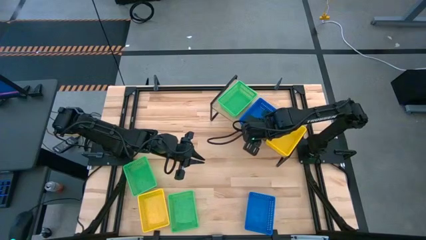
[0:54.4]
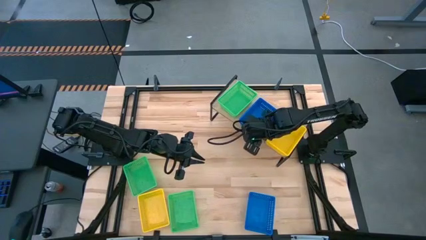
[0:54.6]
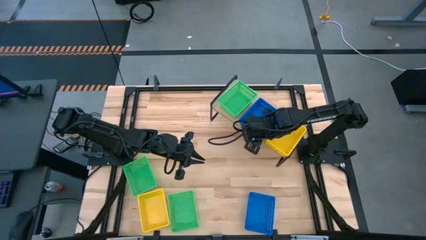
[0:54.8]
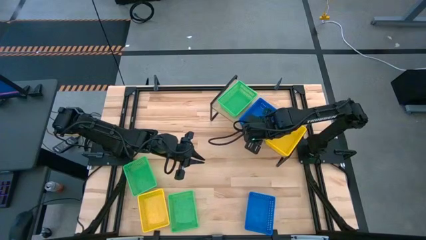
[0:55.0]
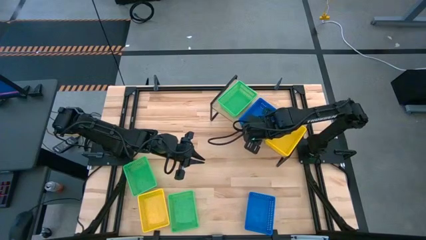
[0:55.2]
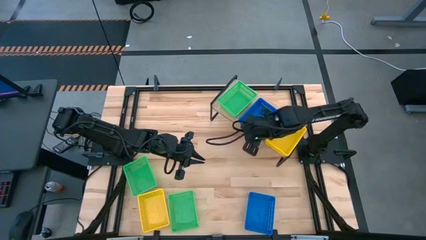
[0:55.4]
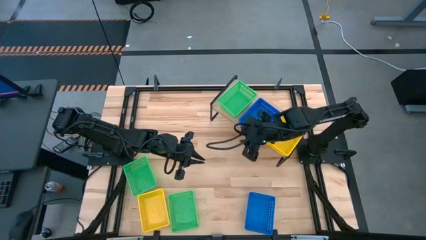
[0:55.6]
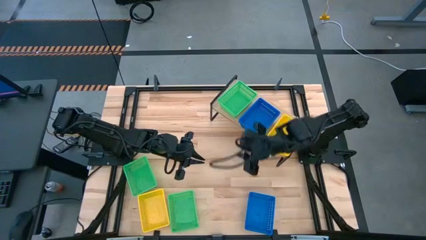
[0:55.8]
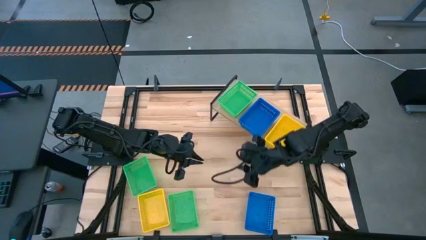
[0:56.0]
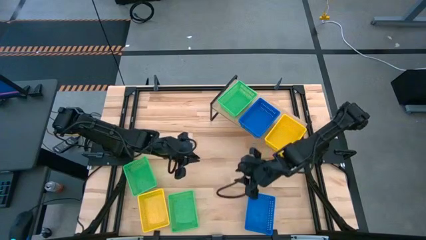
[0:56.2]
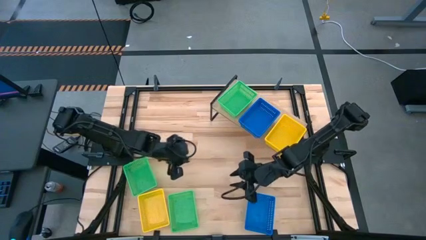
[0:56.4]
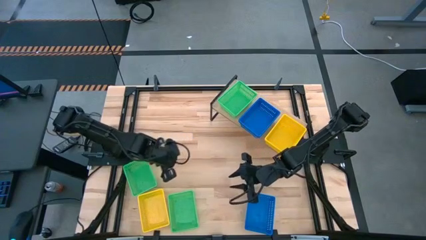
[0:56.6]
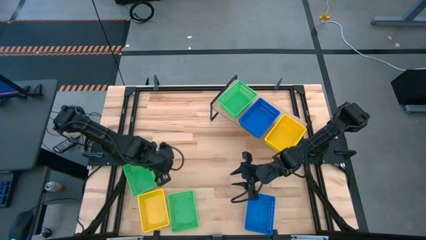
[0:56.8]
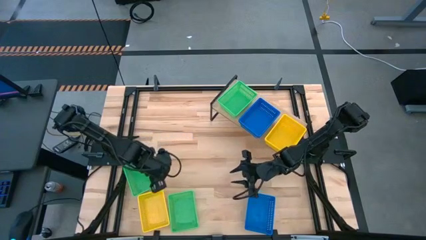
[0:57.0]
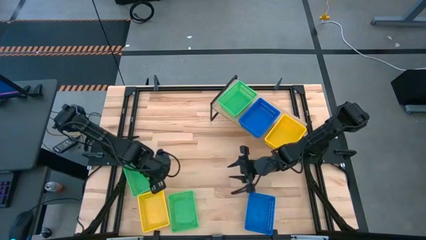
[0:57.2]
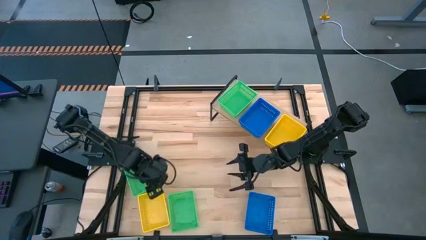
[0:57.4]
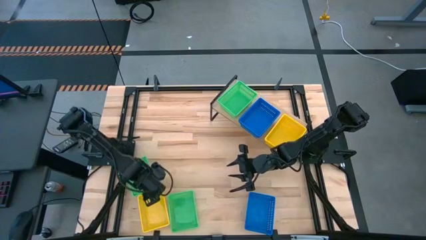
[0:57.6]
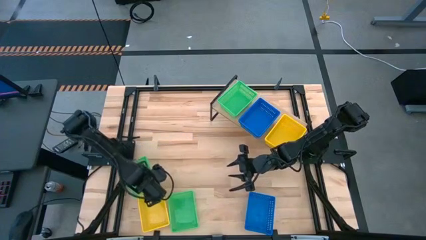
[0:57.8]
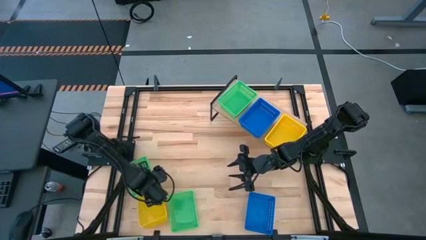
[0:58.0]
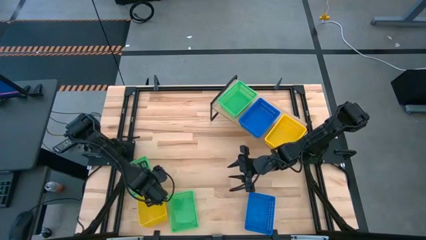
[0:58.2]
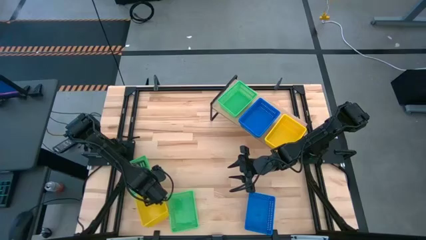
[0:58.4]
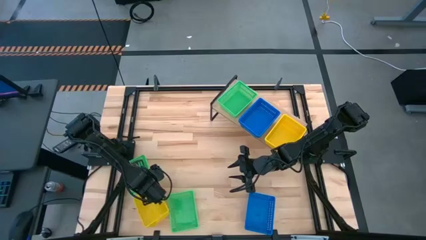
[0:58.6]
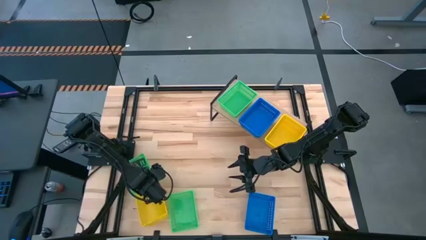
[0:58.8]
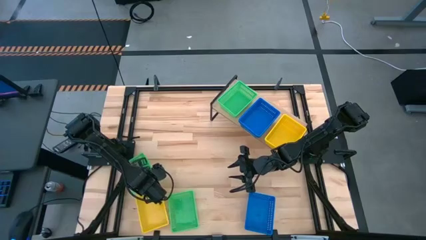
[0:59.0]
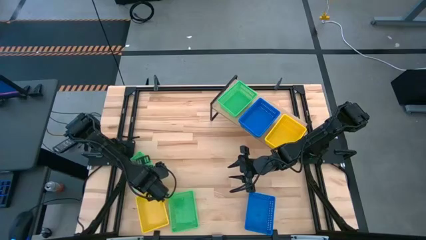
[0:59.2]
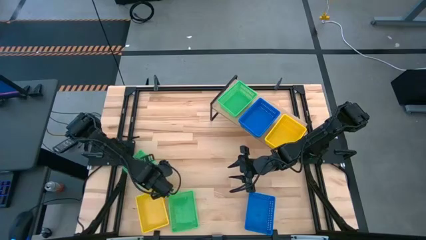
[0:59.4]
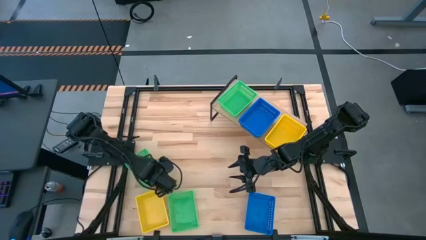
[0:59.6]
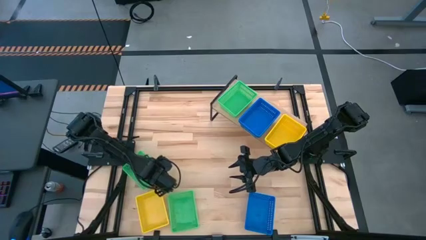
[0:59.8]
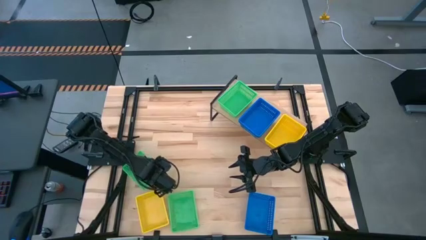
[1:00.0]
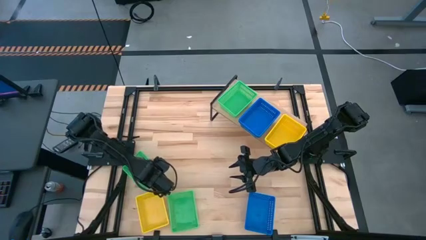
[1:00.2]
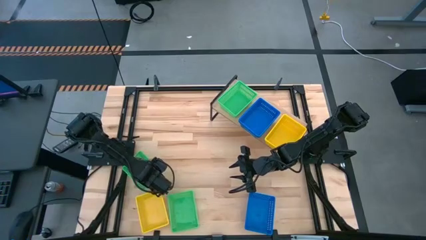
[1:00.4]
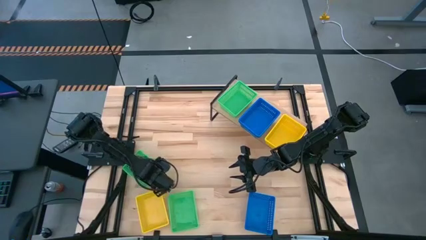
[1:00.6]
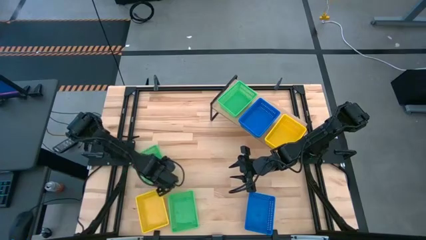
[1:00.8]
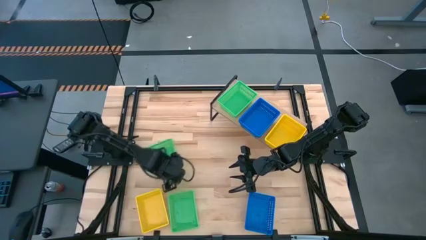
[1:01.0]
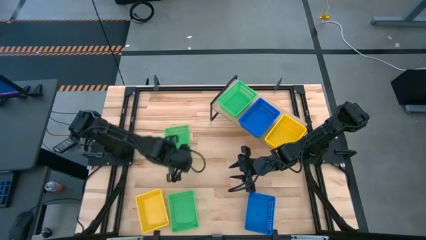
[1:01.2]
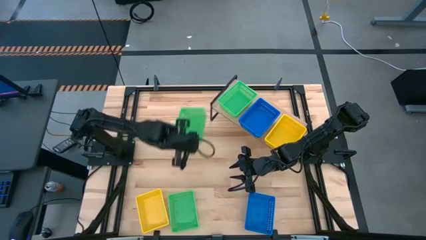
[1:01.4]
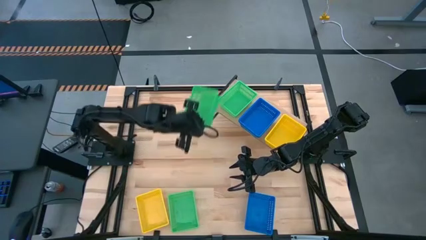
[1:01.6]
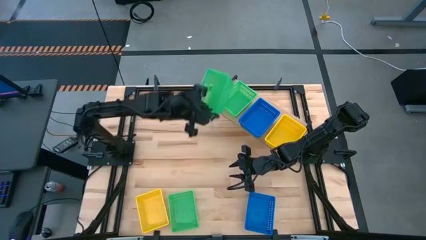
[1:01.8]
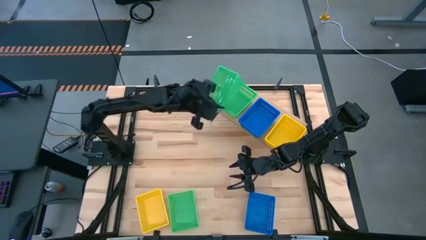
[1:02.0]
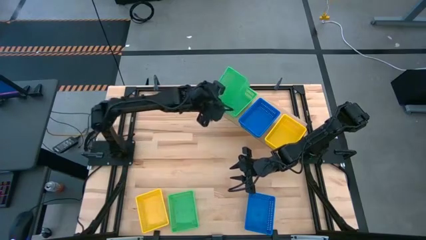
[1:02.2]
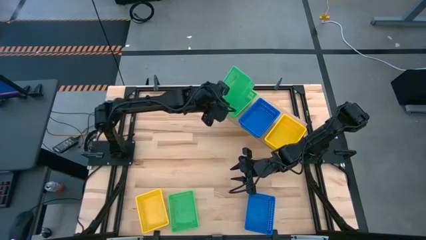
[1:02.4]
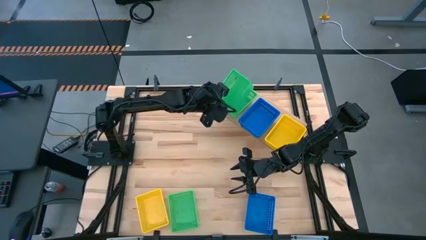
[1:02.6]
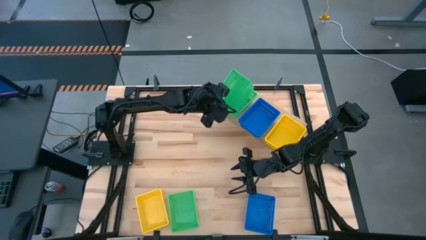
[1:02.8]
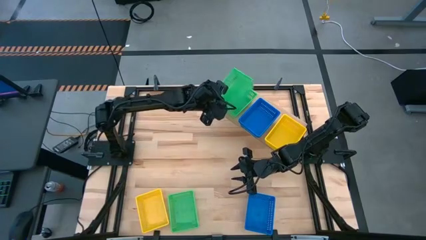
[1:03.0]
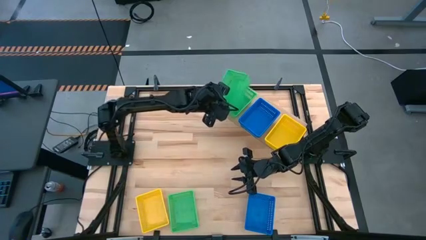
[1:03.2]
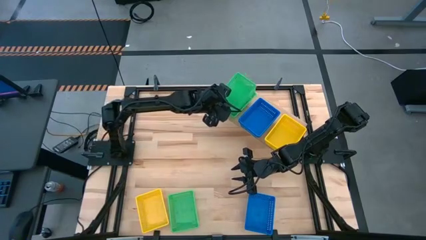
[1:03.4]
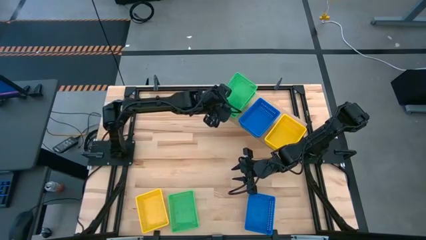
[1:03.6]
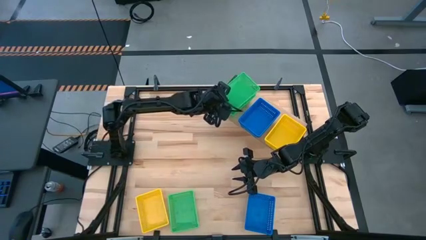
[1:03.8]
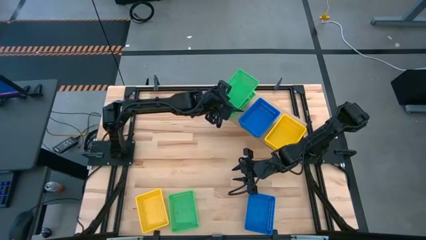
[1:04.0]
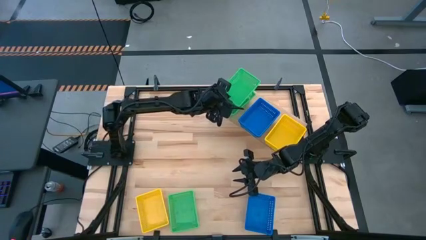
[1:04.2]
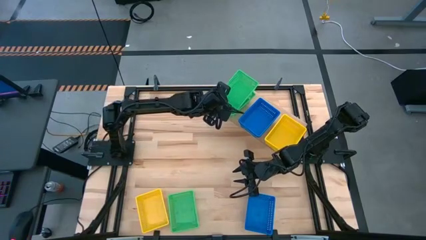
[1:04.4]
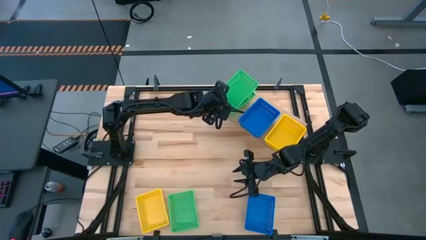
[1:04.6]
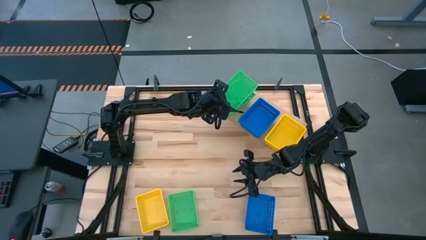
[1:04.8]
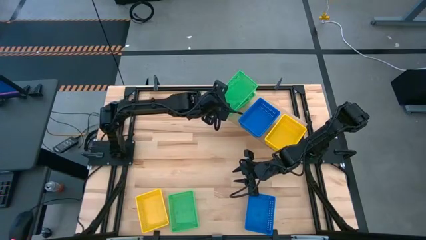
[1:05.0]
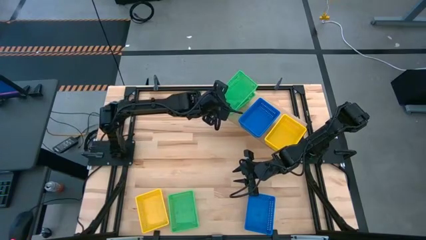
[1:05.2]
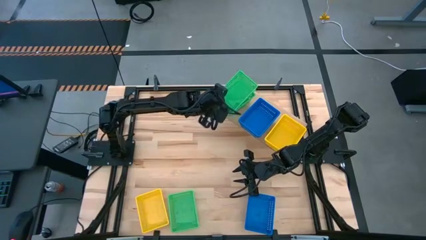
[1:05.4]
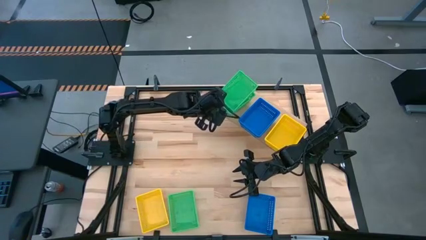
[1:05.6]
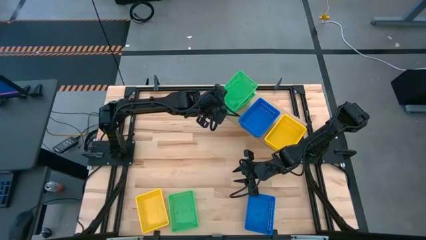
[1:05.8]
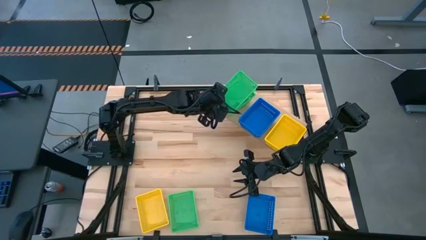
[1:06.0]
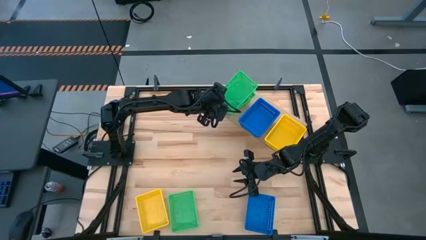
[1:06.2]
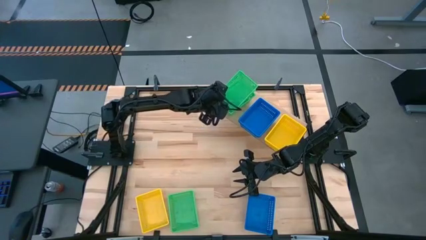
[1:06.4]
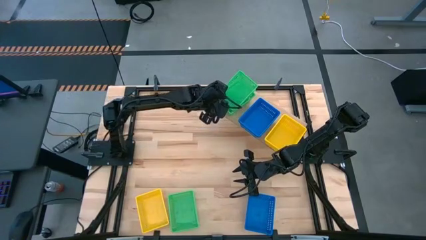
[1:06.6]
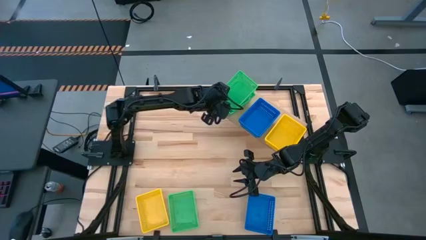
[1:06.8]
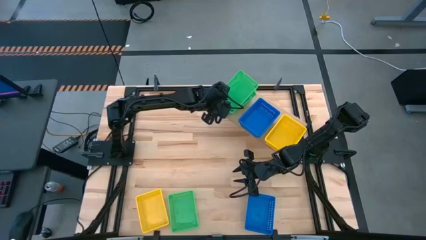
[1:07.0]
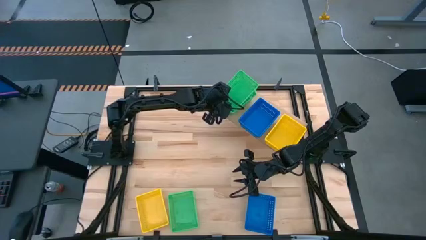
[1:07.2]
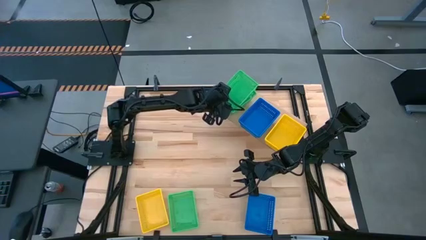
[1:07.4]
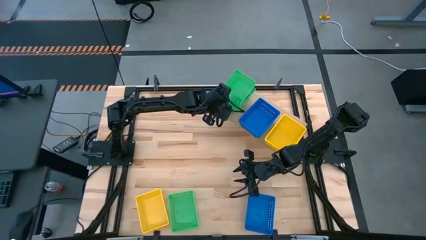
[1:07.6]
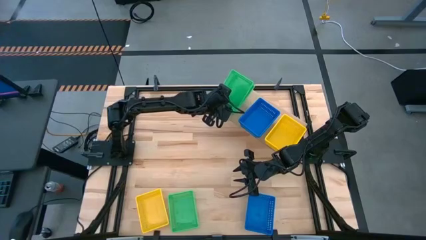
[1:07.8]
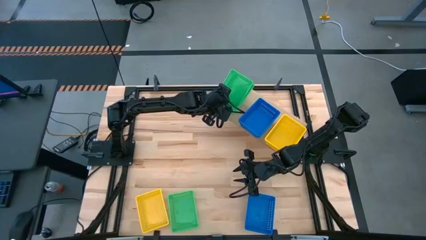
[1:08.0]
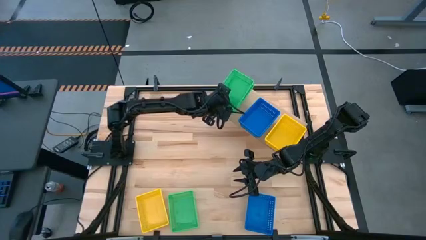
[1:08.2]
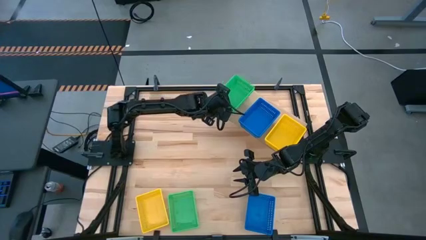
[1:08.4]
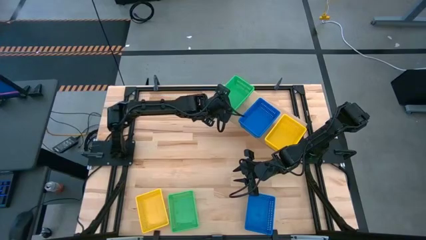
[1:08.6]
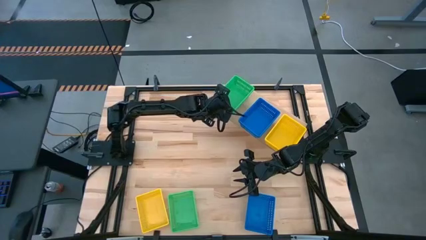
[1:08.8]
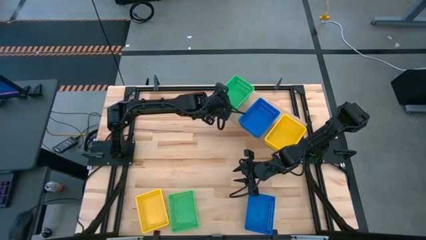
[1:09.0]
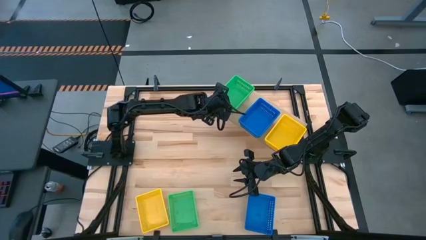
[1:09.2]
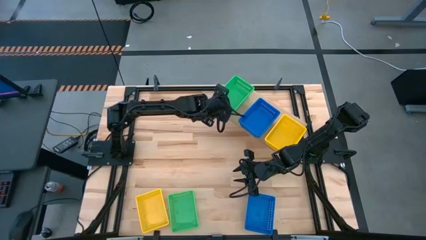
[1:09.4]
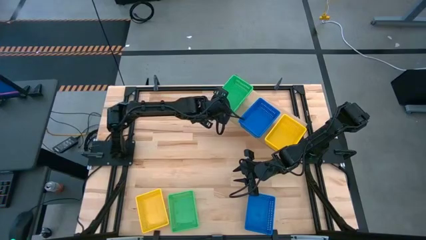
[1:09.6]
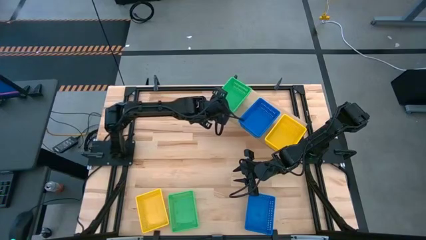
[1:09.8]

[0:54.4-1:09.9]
Task: Stack baskets on shelf by color
Stack the top green bin on top of the green bin on the shelf

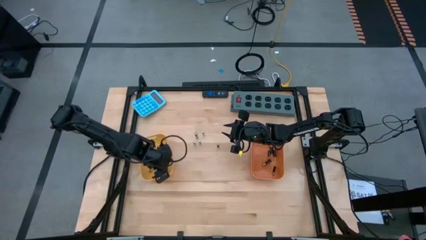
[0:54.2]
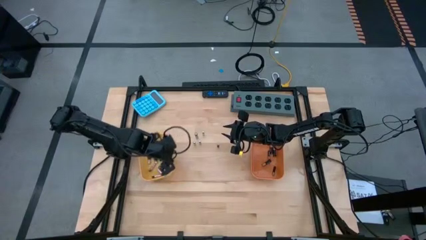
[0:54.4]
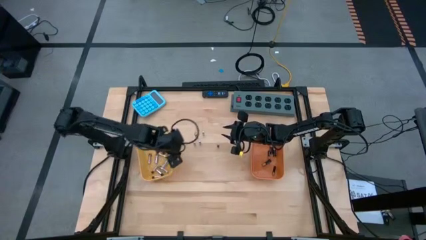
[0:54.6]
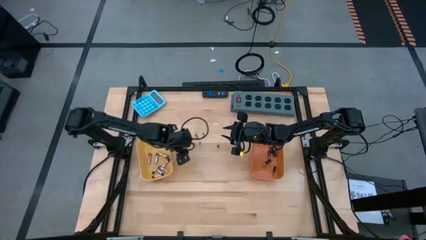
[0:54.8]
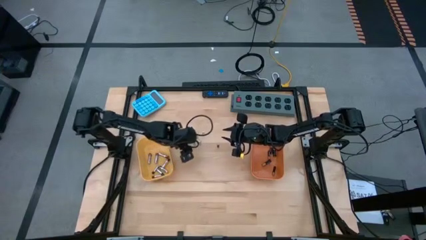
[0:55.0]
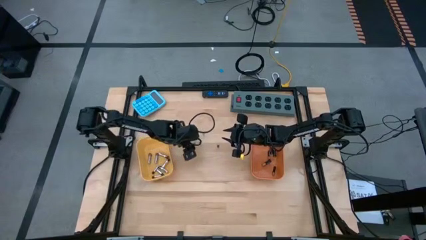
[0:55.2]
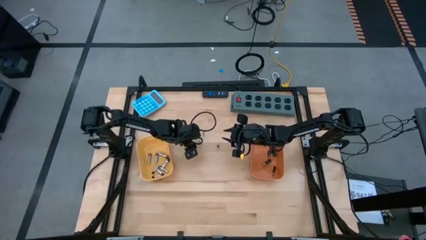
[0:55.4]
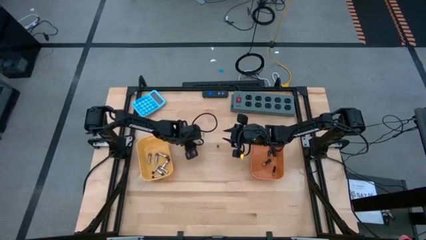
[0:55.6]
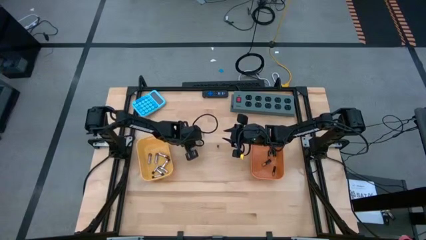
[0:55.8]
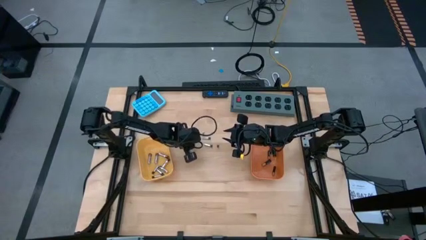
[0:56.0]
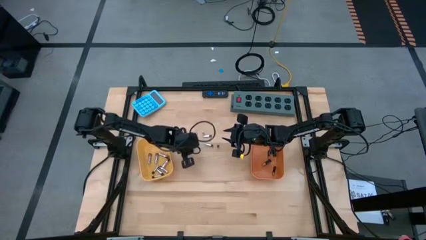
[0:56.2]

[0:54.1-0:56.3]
Task: Sort batteries
Put the silver battery into the yellow bin
